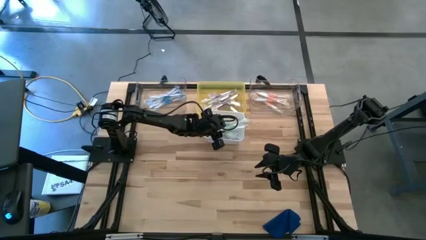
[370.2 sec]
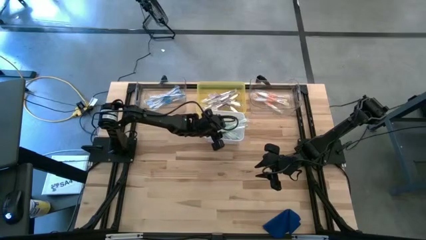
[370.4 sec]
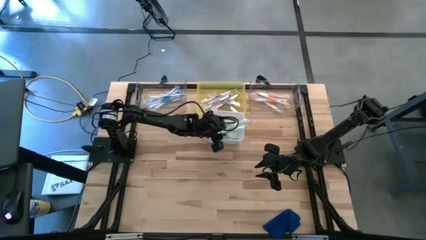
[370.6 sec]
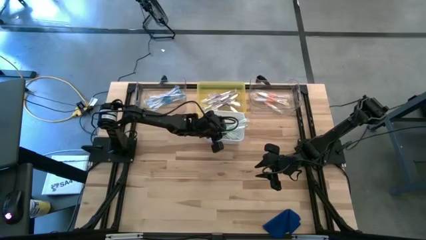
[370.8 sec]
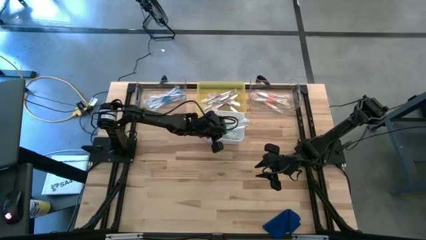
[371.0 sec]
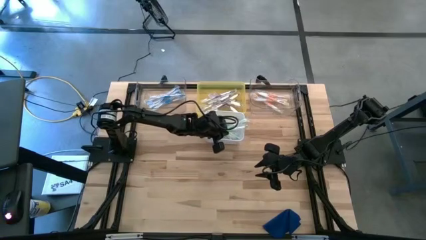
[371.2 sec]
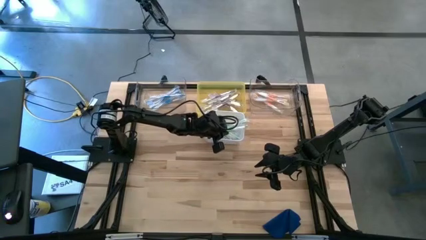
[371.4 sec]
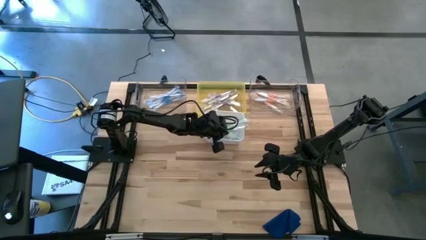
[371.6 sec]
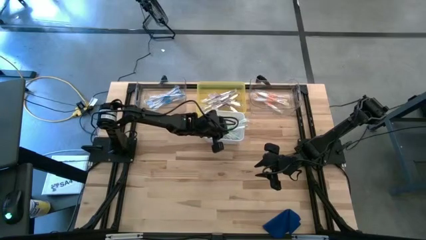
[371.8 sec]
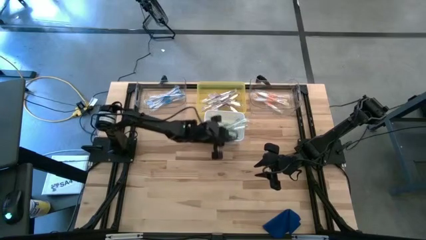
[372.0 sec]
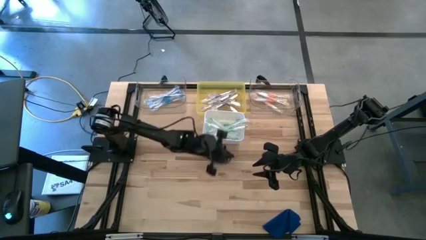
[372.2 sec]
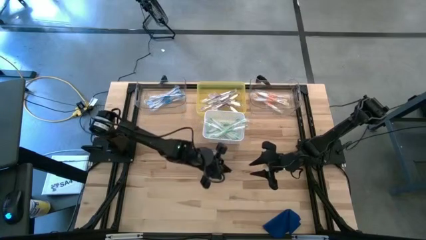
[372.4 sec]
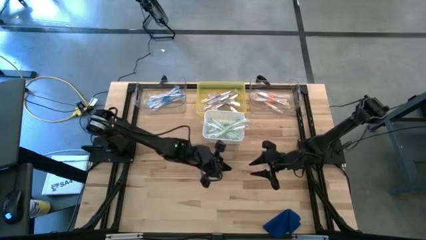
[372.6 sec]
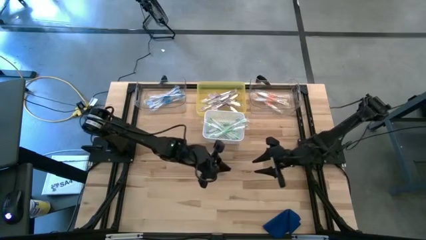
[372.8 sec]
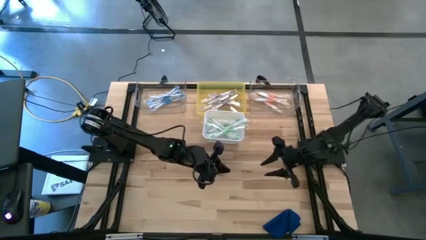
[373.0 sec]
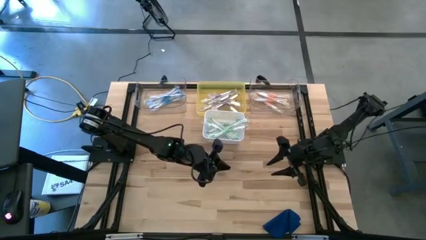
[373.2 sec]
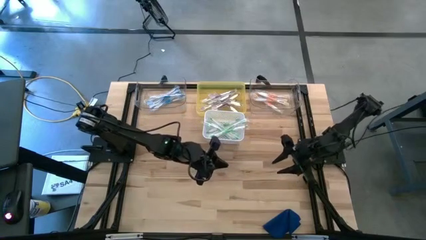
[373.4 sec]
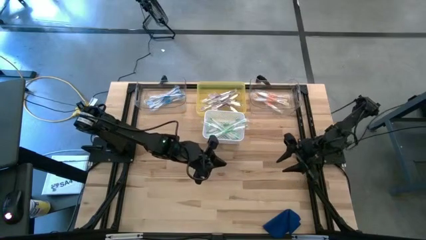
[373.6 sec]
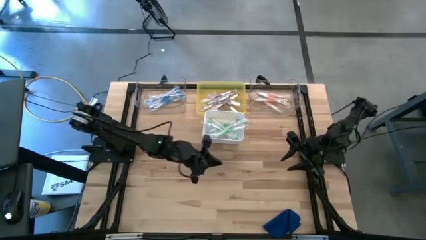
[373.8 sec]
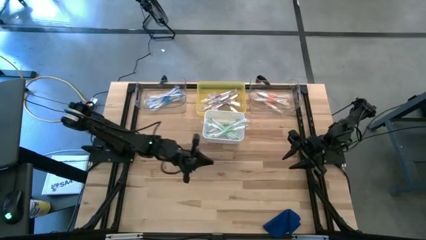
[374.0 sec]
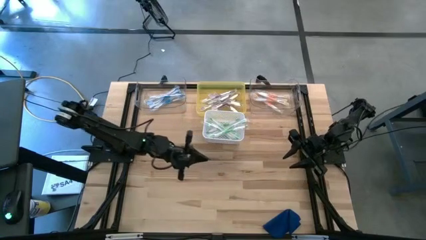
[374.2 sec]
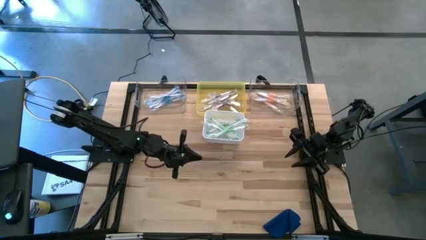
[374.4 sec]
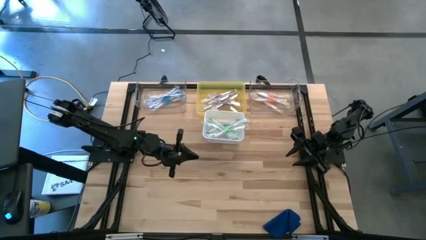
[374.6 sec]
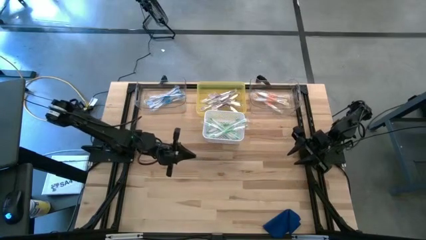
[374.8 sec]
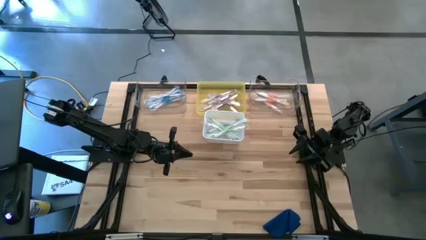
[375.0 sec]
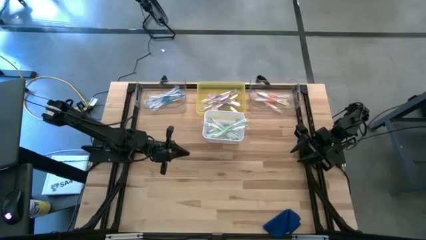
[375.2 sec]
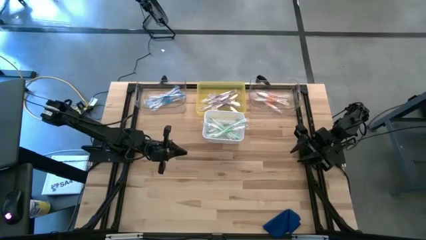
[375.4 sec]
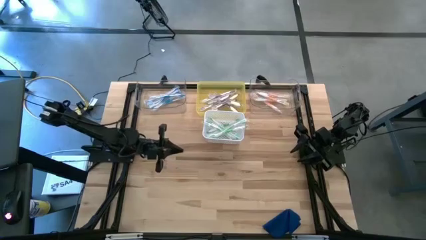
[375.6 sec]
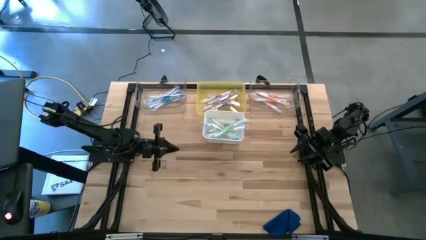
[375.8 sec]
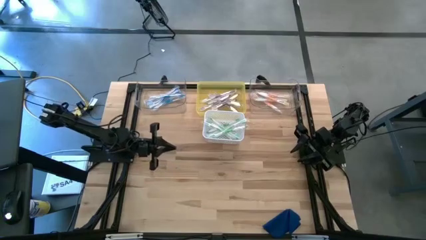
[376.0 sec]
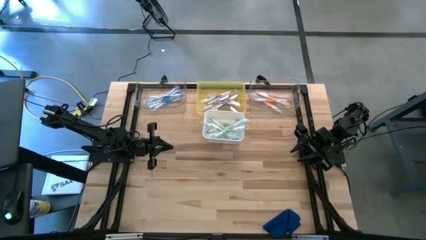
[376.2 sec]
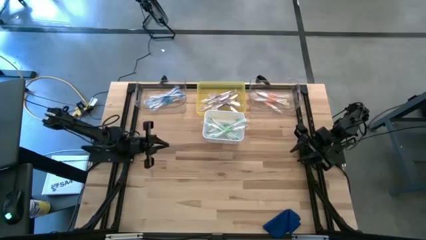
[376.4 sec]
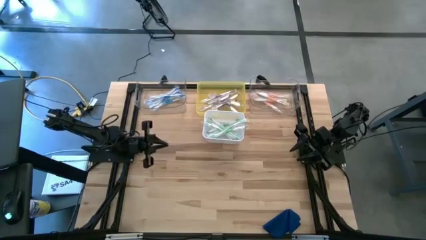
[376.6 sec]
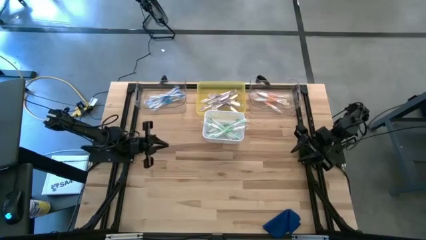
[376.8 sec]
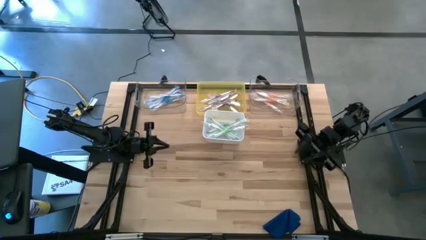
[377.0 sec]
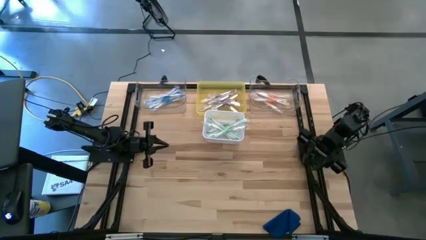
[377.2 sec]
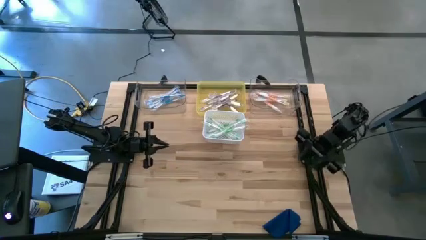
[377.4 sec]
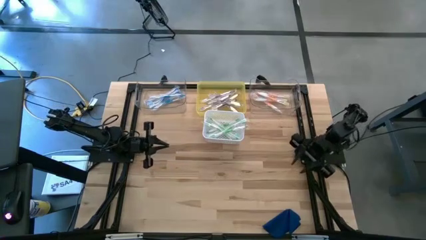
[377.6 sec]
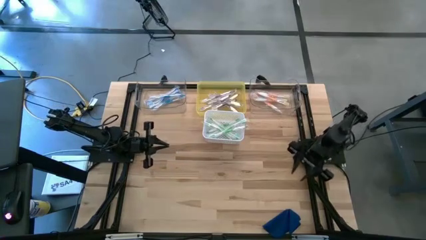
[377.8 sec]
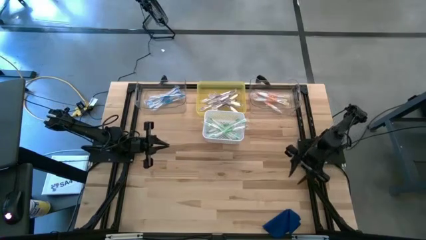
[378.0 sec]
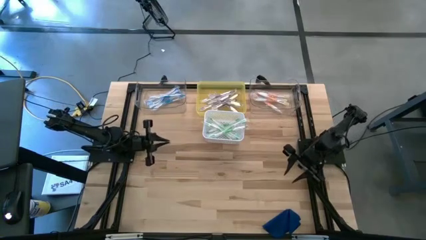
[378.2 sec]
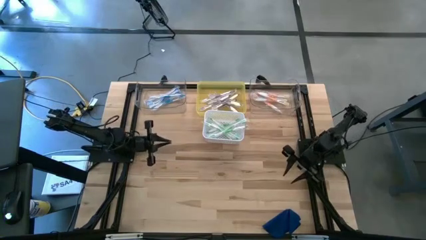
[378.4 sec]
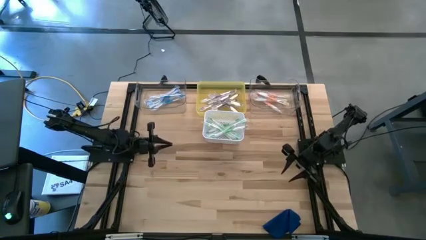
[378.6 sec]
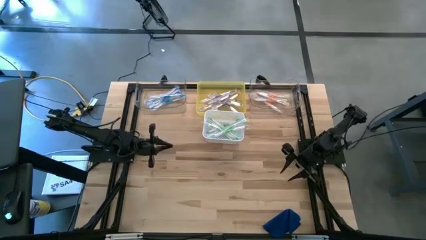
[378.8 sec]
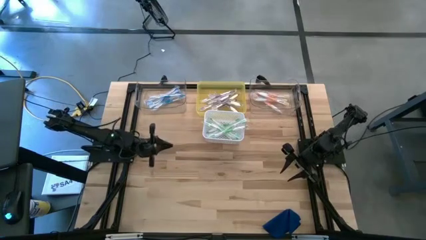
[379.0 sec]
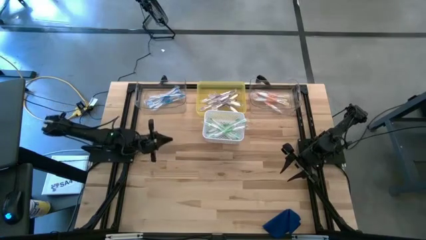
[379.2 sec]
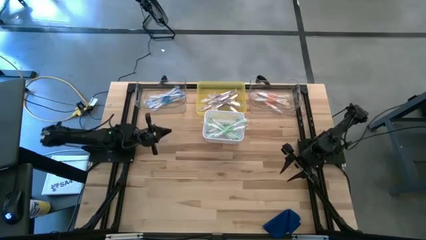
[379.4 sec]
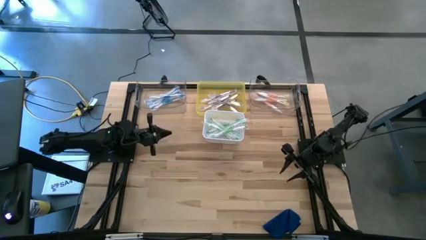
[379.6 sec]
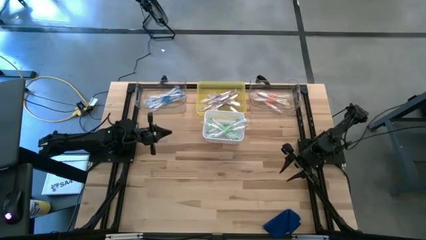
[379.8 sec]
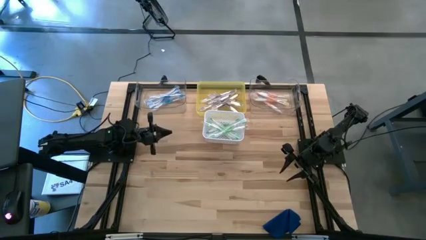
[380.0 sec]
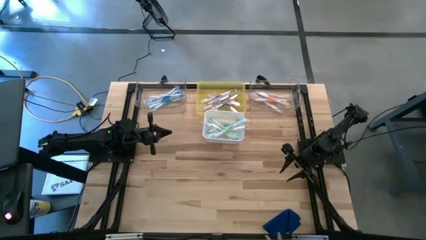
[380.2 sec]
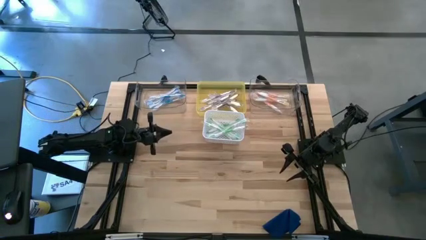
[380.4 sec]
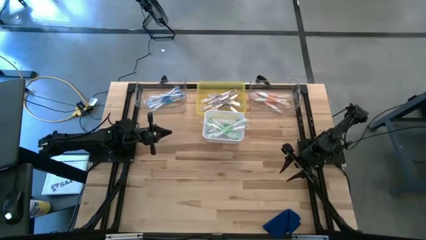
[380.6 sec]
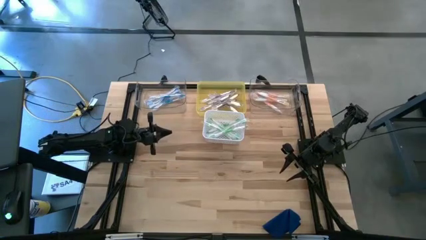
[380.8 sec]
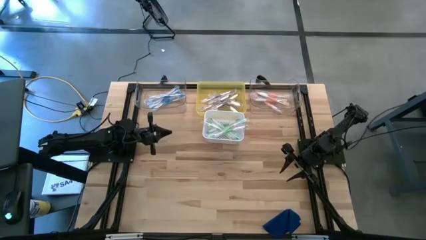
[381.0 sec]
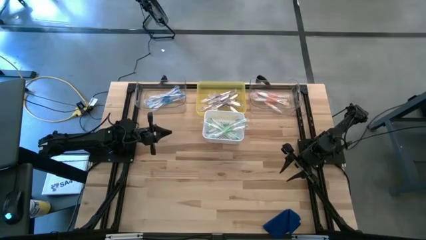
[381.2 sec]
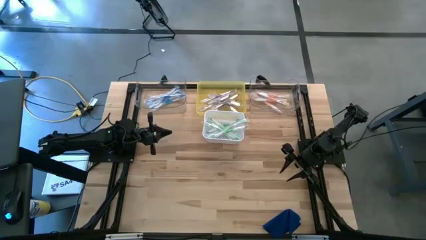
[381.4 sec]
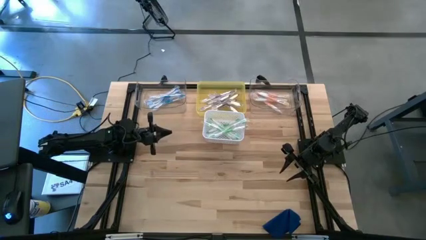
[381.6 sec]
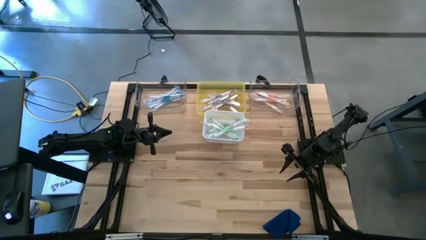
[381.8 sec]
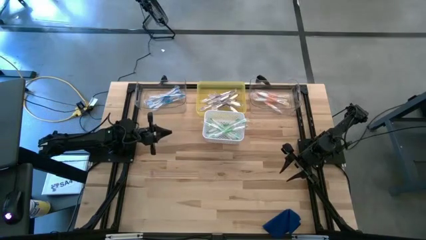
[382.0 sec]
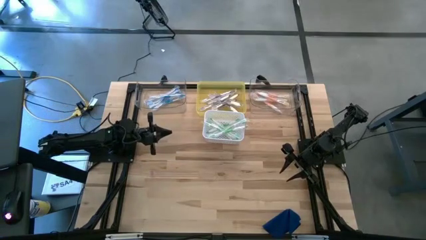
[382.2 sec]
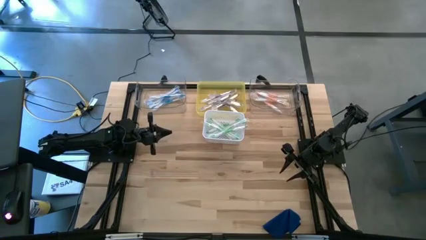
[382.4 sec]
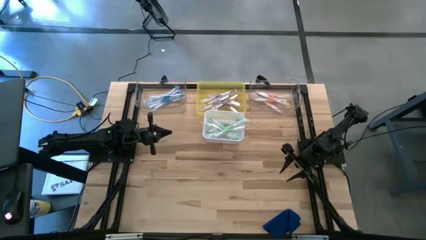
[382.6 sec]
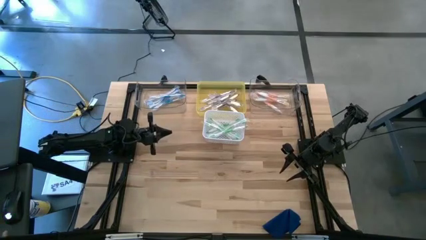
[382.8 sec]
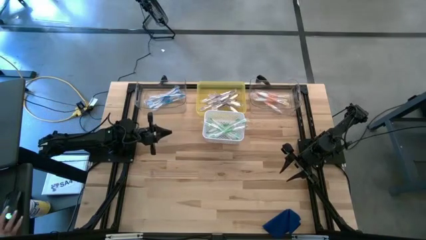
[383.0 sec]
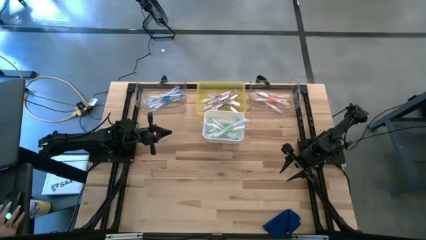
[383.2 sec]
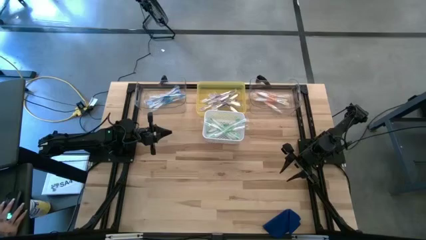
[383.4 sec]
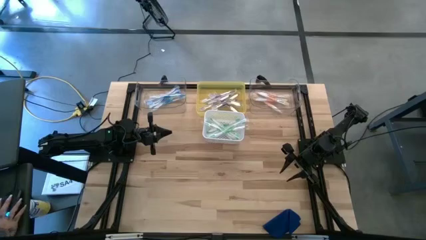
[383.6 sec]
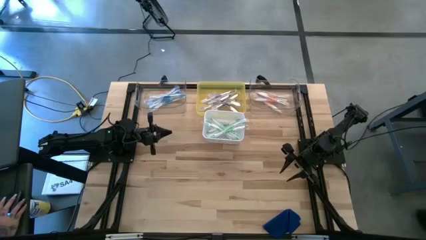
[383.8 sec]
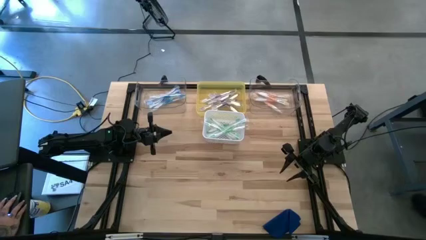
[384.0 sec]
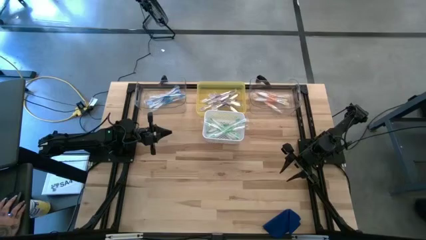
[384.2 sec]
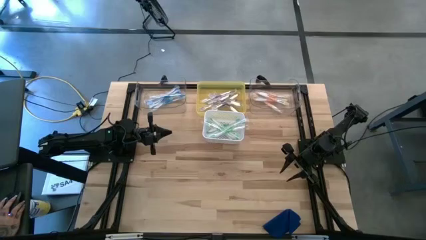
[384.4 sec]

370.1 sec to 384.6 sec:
Task: Pick & Place Toothbrushes
Return to Home Position
